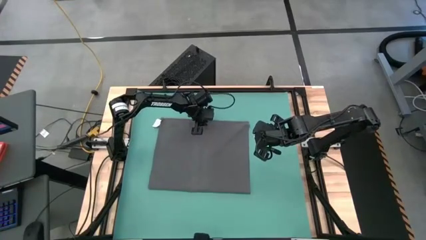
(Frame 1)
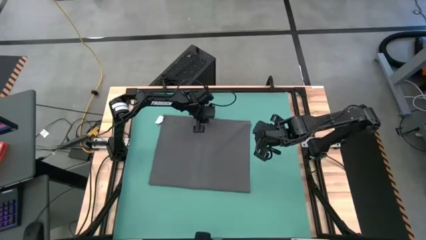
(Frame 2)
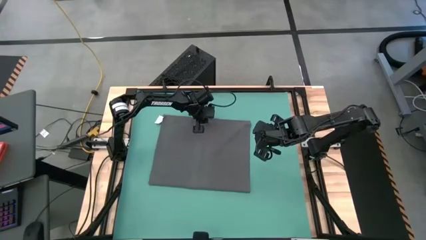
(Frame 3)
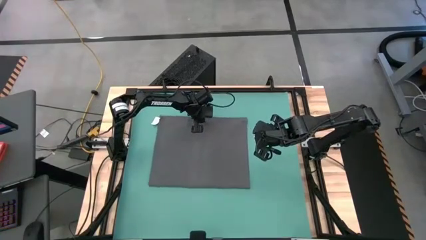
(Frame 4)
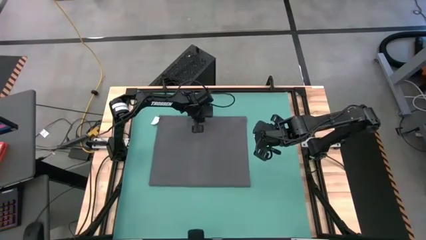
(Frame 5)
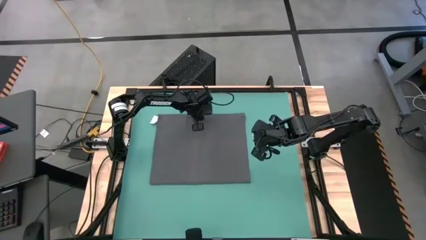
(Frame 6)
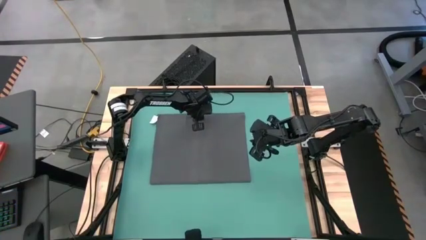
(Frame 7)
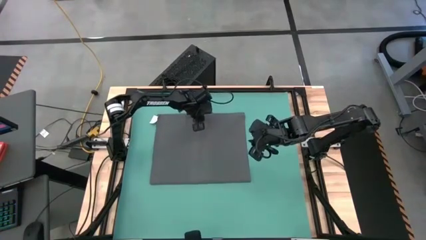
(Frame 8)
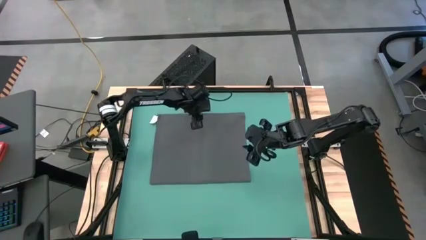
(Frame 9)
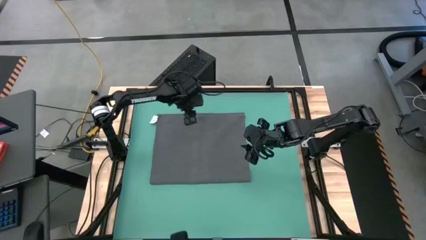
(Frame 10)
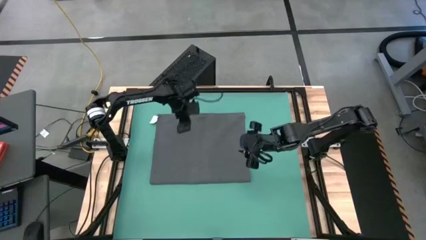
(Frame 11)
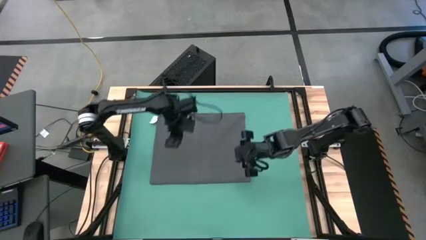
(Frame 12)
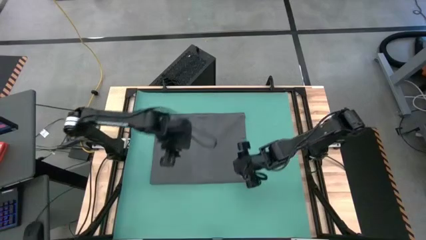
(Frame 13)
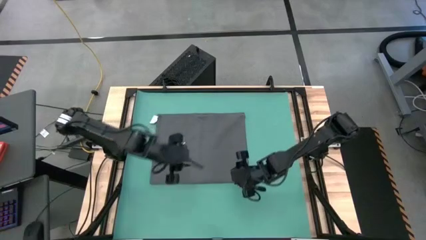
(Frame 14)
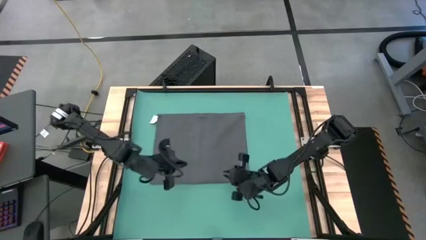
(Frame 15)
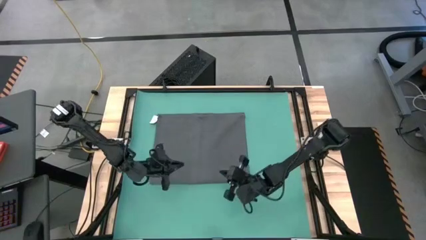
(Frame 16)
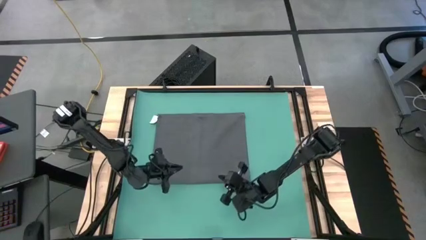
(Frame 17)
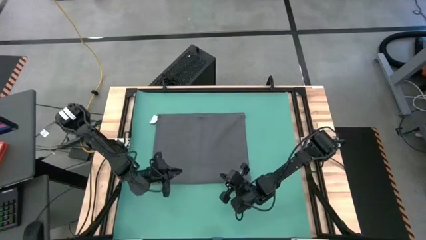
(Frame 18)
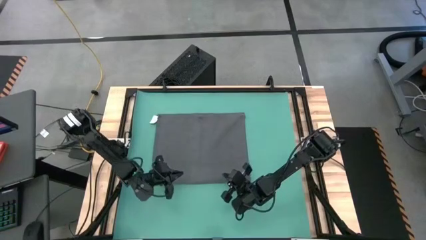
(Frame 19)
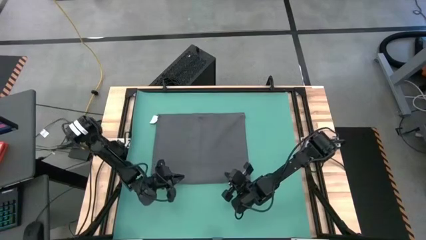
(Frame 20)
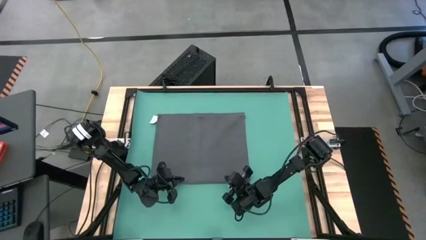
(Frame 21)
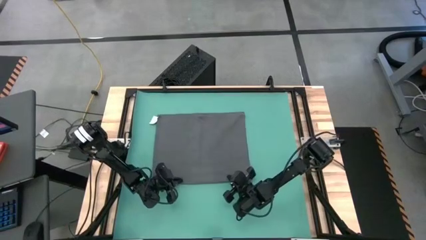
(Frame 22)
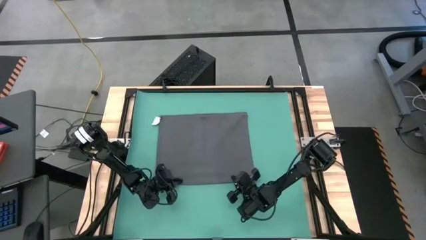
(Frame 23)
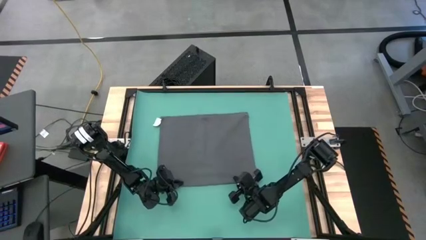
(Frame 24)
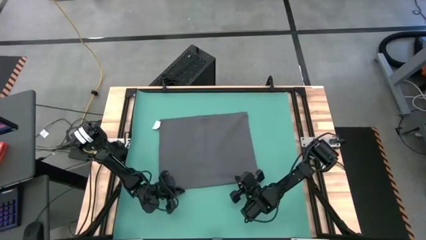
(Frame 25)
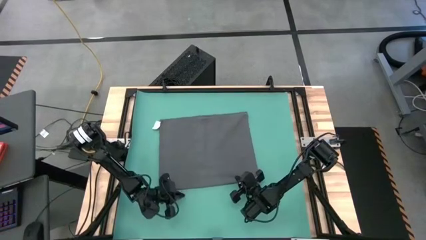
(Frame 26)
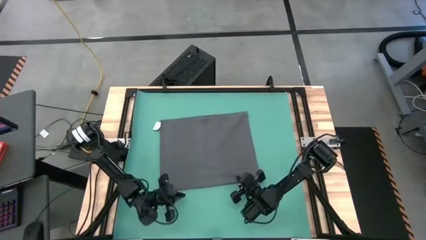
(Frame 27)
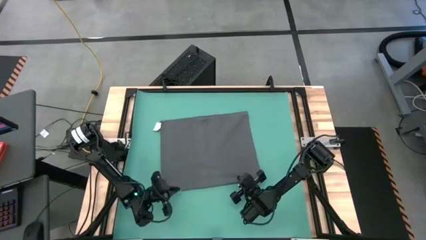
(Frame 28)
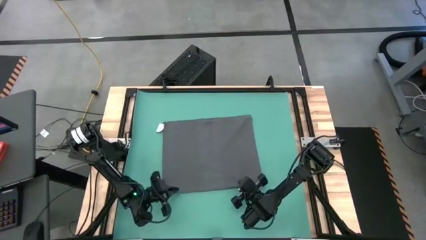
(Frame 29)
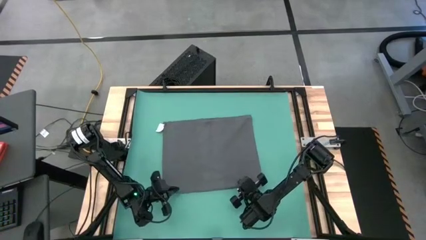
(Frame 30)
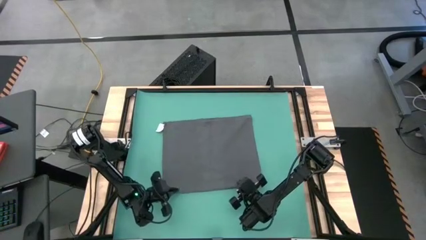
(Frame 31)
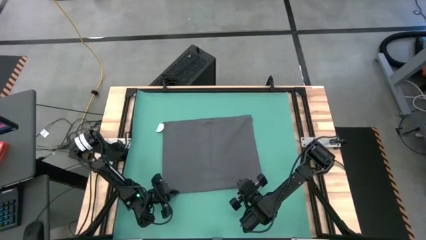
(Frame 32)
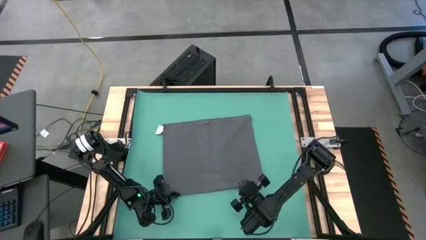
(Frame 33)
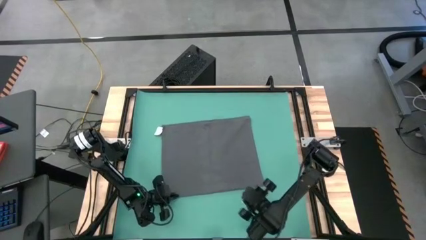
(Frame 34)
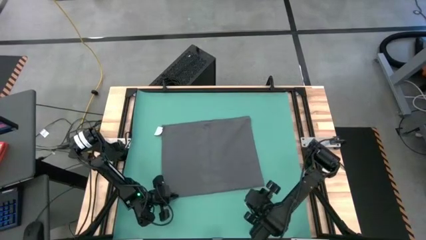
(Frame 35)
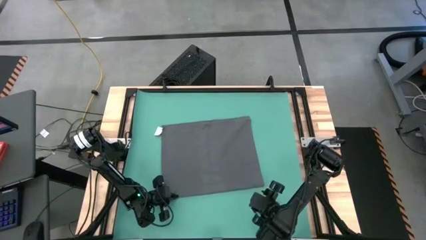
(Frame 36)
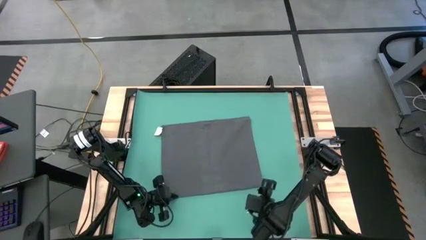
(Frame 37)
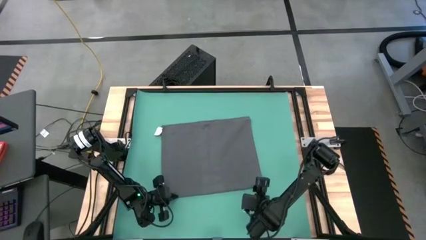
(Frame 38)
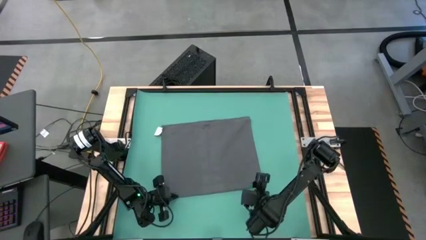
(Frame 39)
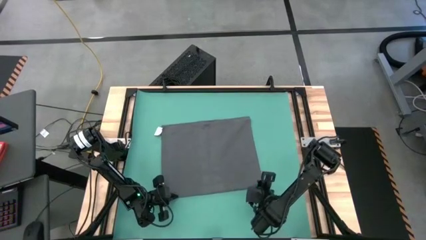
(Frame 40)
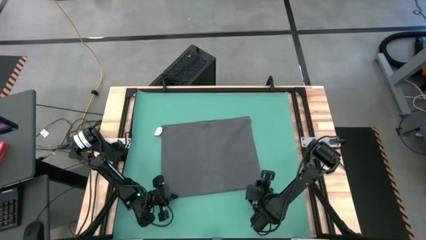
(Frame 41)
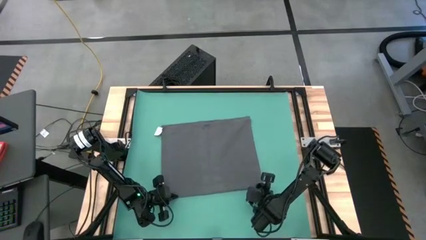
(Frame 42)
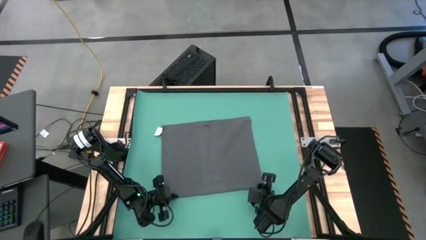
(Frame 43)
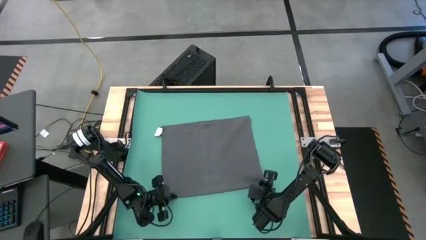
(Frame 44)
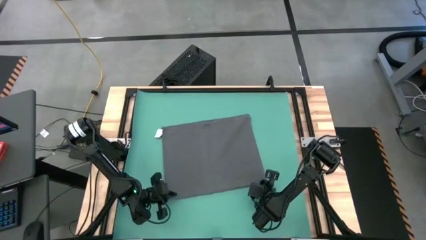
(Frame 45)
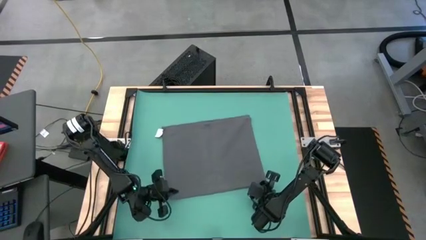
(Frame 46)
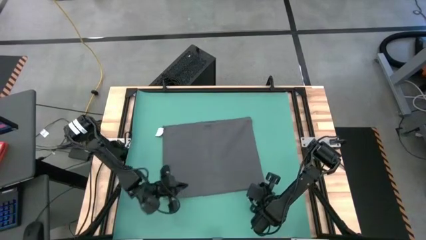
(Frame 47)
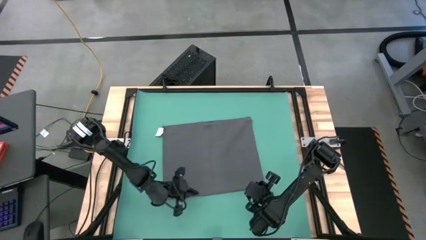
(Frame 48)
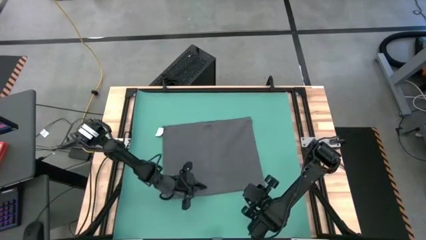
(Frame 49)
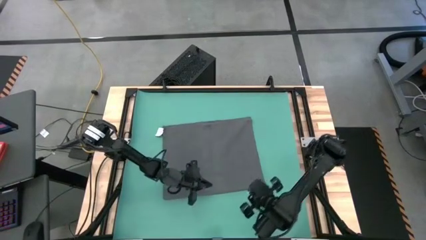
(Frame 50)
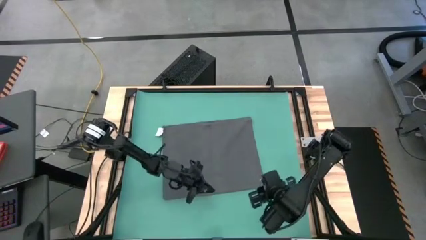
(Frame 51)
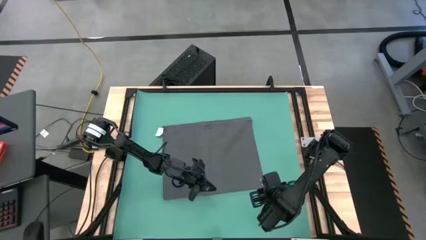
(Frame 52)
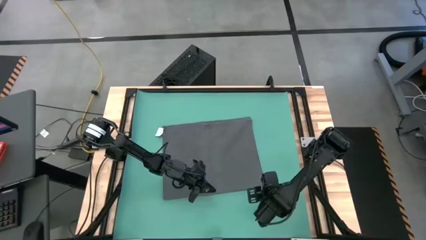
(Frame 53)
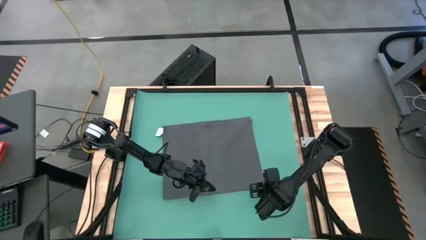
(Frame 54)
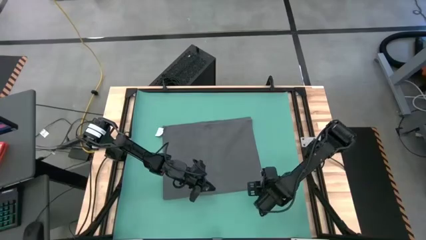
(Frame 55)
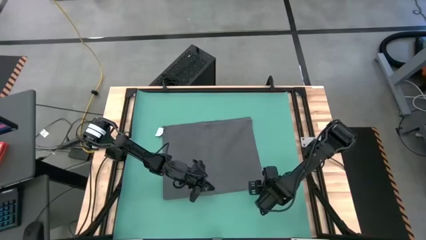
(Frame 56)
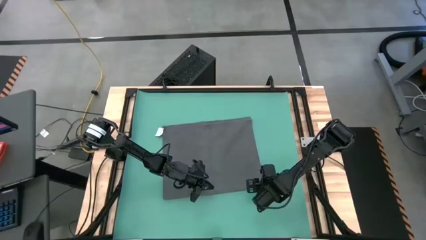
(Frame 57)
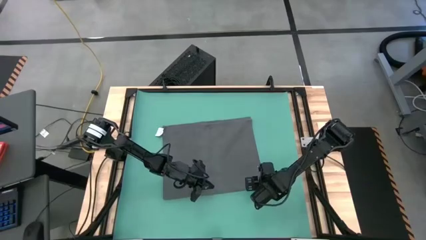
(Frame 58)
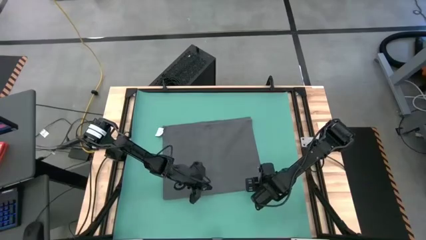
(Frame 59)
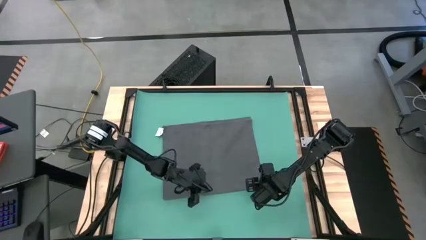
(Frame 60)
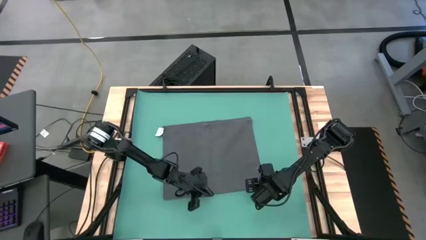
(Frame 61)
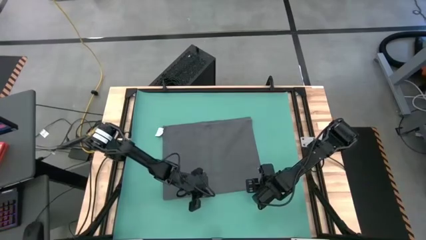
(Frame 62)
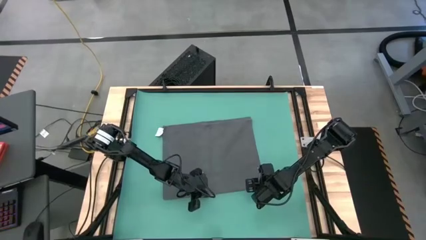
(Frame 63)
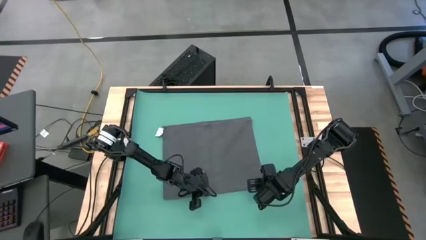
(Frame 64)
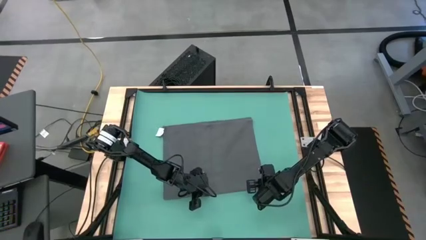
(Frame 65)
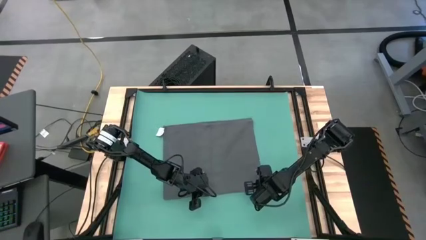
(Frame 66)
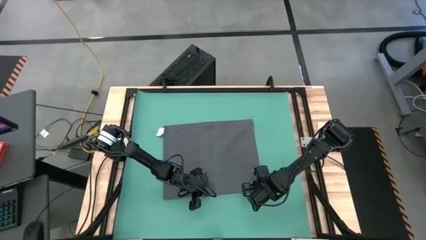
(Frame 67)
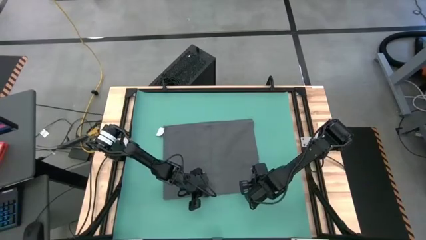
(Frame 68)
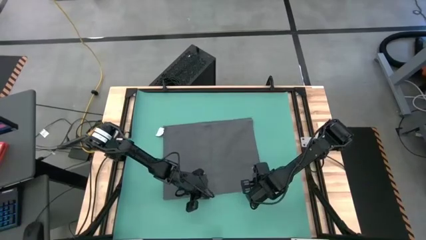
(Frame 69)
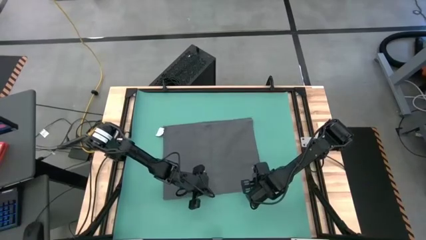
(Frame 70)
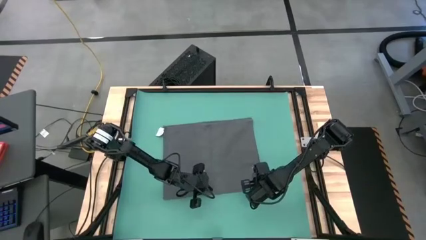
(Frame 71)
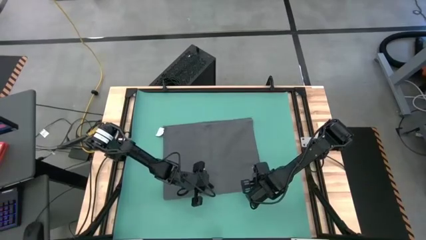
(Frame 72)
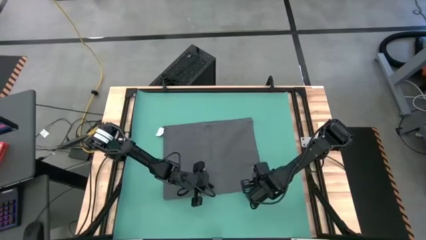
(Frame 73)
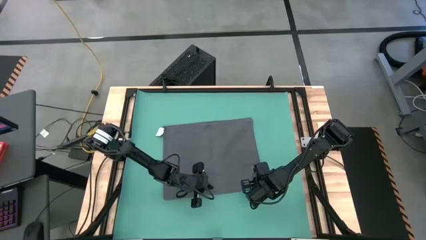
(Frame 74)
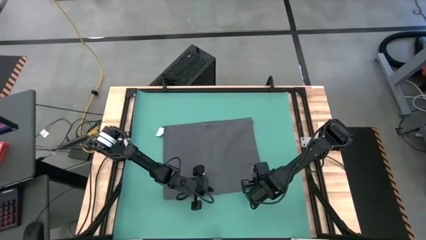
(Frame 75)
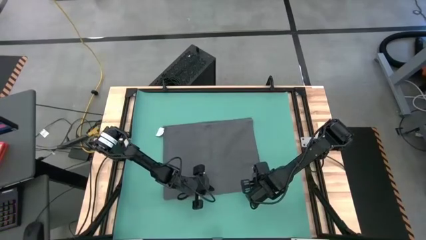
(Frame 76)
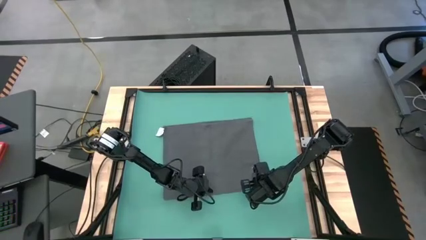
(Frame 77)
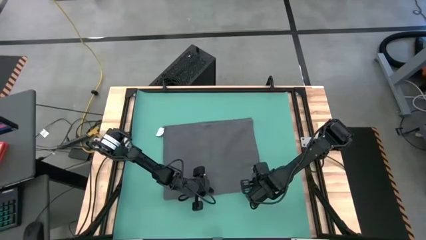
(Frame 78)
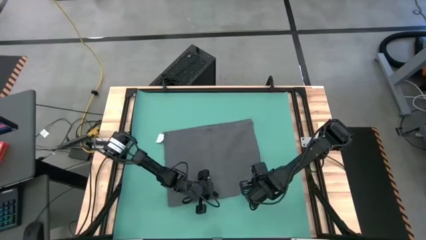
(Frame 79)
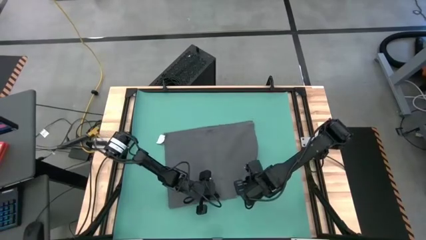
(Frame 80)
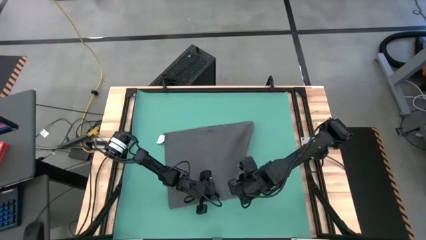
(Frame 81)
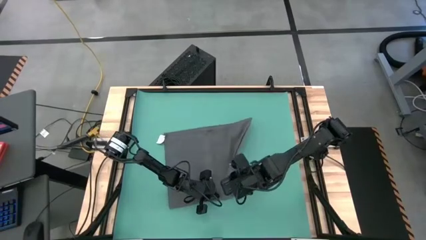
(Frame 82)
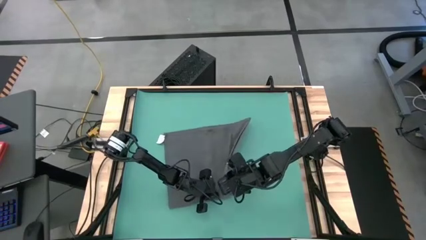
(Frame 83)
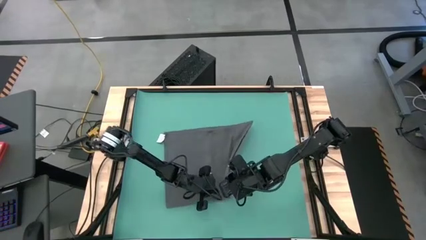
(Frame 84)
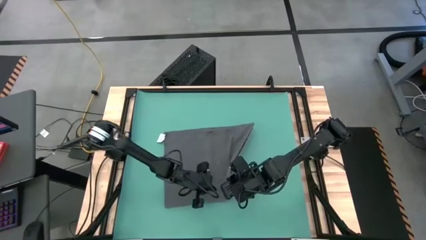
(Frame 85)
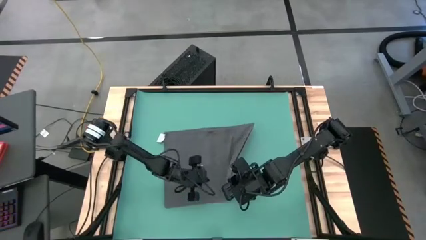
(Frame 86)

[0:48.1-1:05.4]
Task: Roll towel
Roll the gray towel on the table
